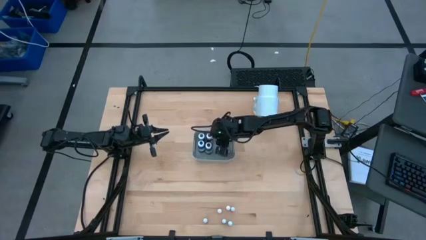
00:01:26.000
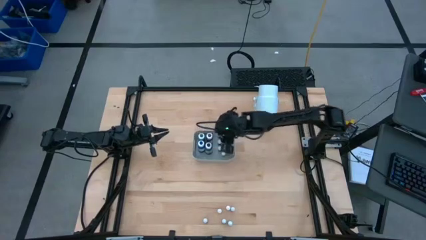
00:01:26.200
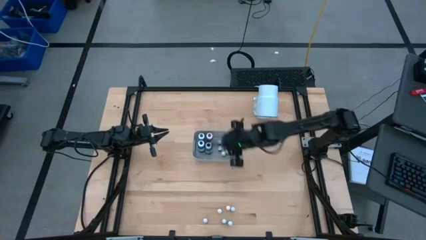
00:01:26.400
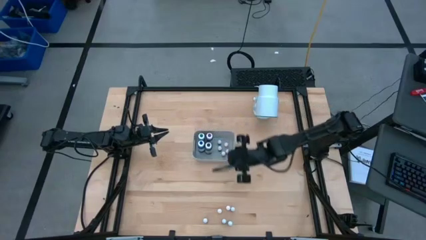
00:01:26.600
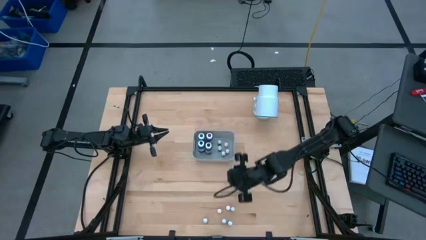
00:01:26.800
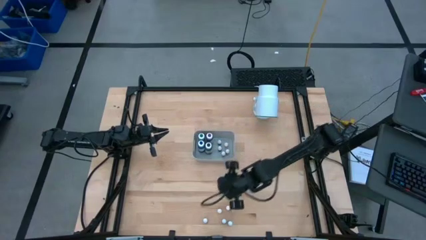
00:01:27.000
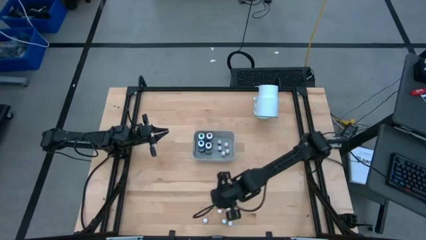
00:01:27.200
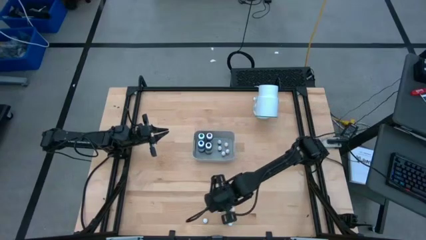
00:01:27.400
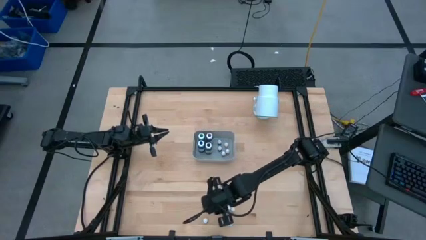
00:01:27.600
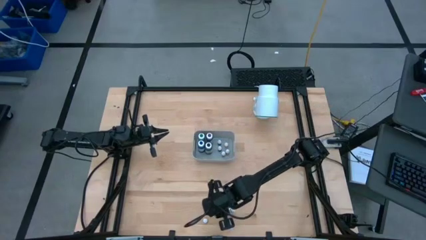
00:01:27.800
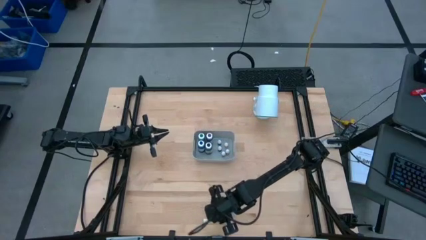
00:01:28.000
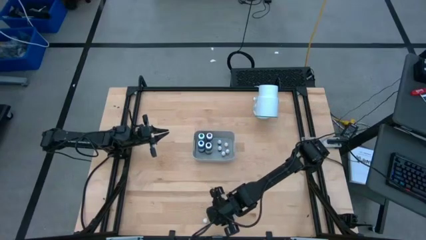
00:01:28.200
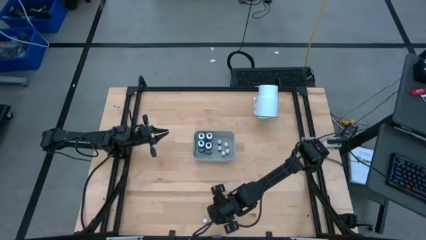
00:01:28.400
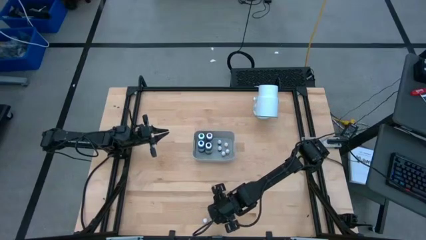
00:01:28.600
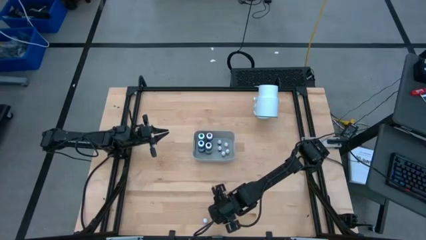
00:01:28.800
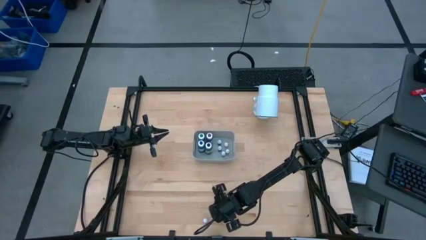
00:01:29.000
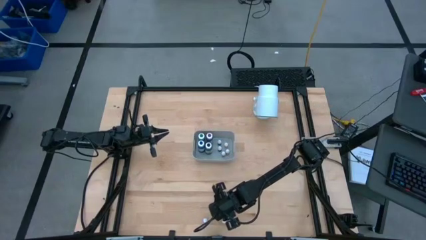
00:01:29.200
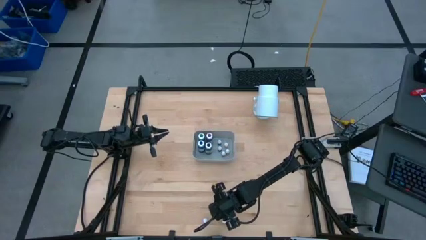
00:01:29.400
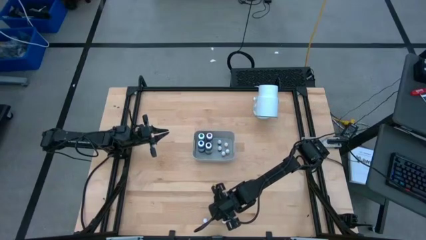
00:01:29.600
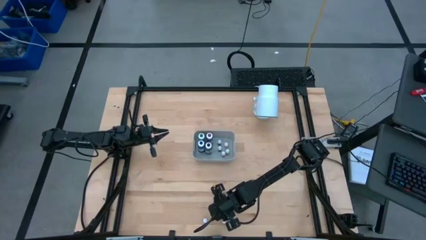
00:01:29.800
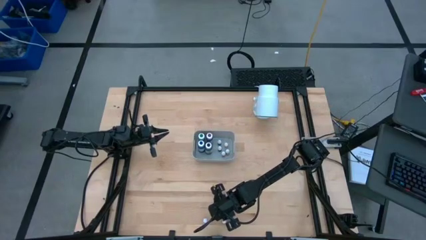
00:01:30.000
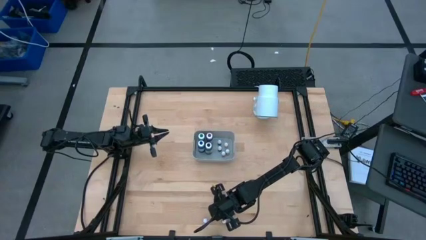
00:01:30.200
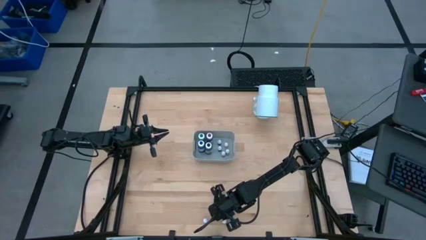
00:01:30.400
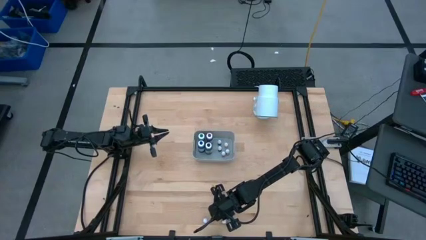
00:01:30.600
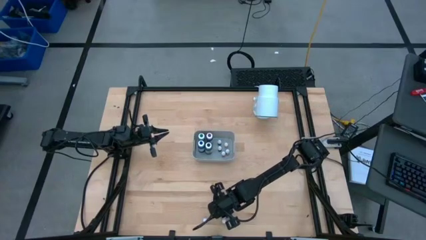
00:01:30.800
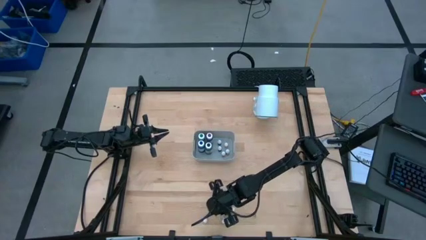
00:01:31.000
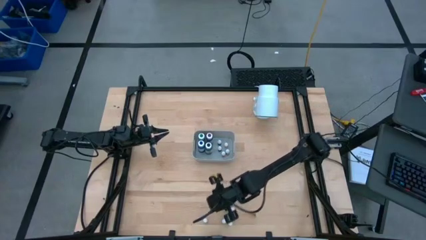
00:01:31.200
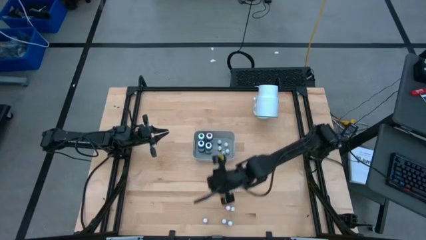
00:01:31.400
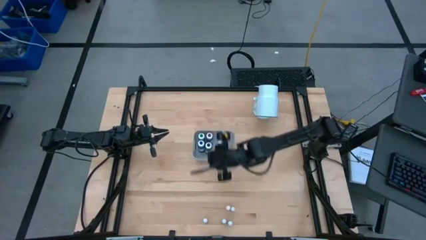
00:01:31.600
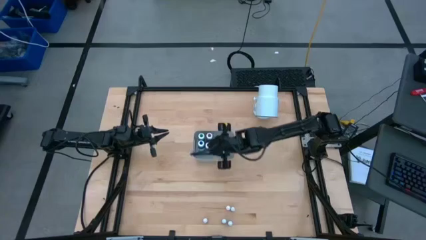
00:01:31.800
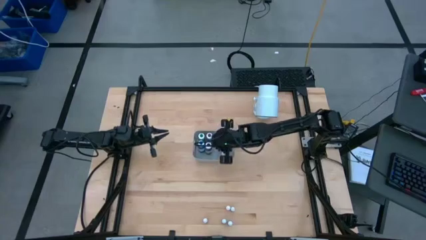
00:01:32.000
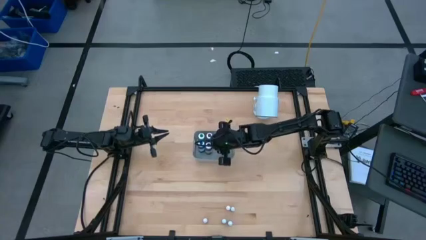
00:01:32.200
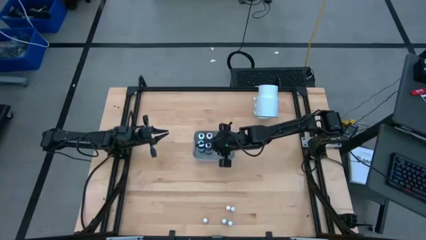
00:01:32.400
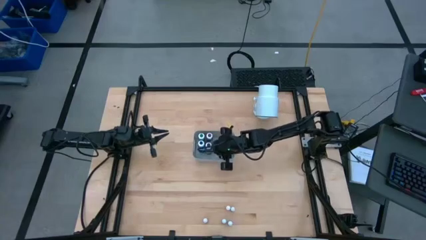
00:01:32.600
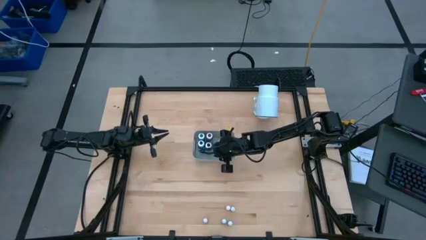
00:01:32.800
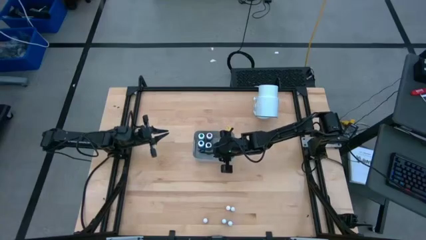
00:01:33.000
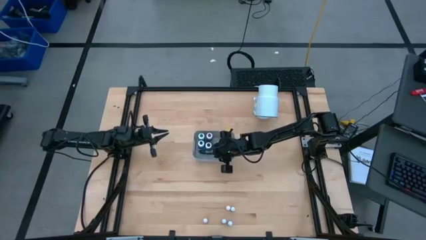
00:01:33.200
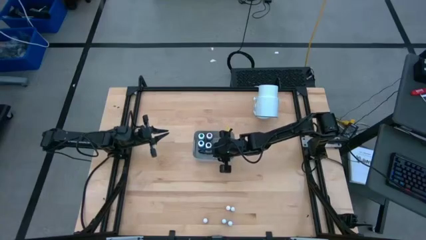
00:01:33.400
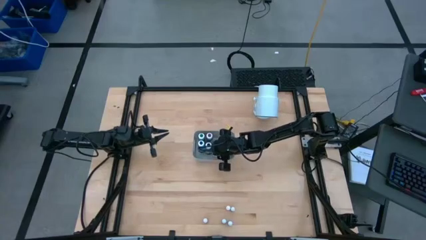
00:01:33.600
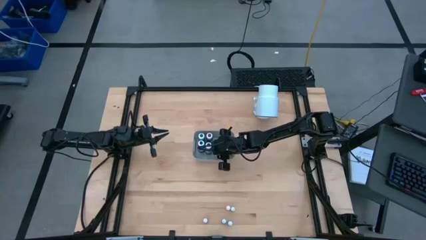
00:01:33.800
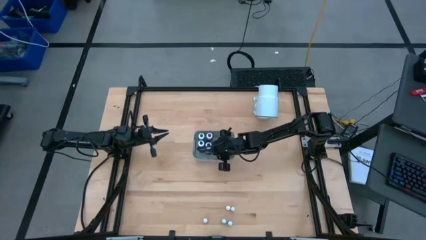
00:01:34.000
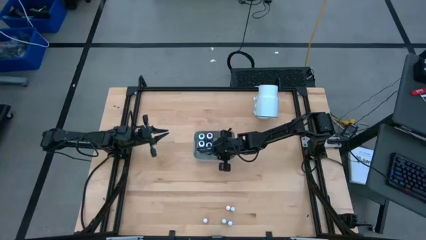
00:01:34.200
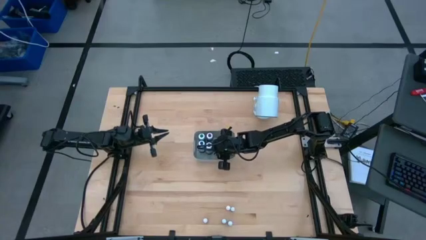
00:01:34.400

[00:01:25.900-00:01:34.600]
Task: Pick & Place food coloring
Put the small yellow food coloring bottle into the gray bin

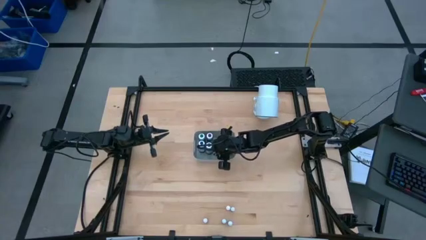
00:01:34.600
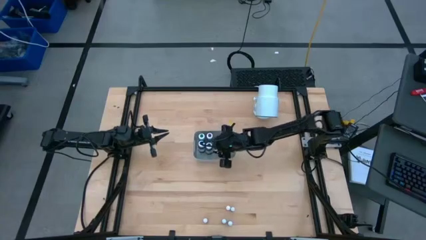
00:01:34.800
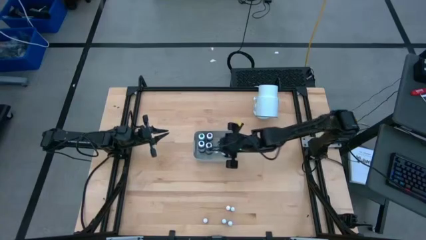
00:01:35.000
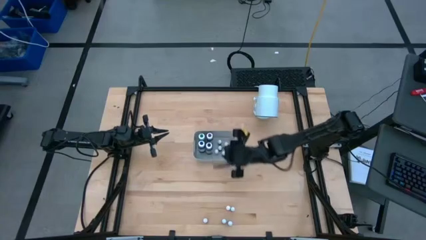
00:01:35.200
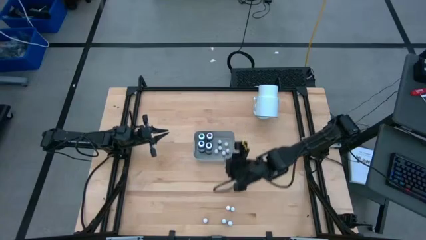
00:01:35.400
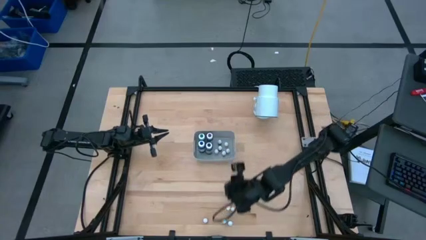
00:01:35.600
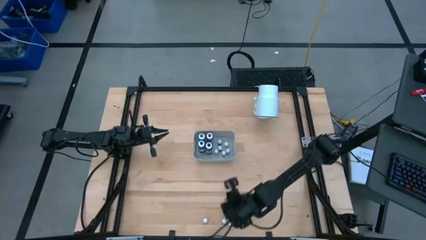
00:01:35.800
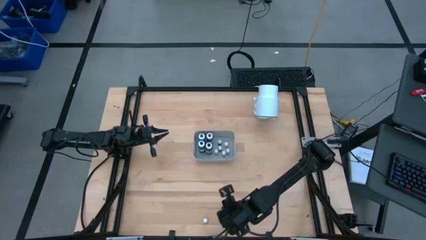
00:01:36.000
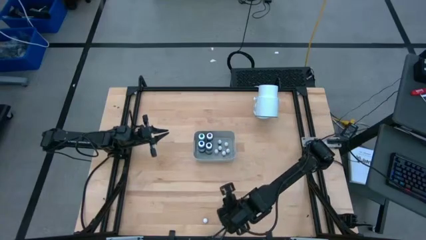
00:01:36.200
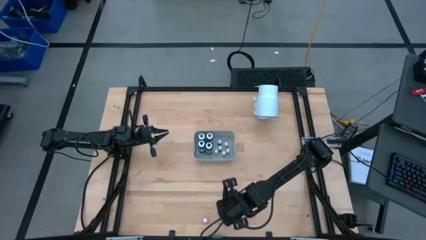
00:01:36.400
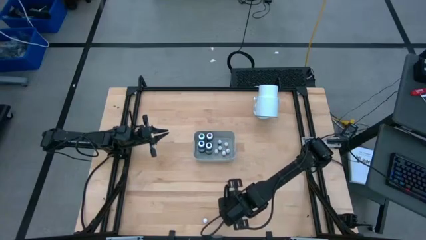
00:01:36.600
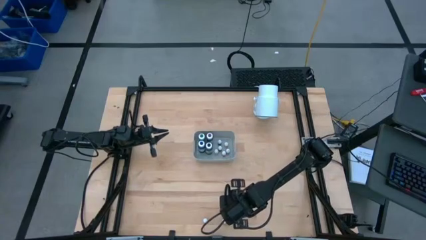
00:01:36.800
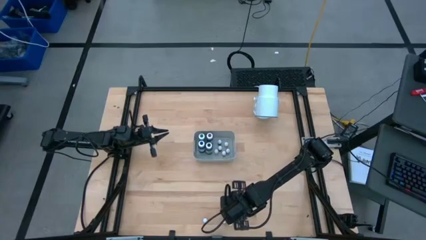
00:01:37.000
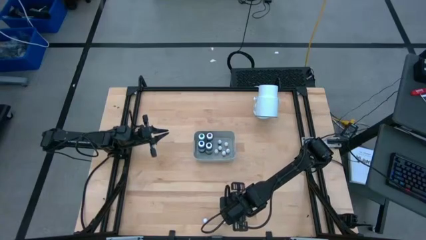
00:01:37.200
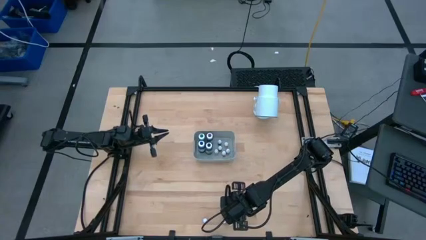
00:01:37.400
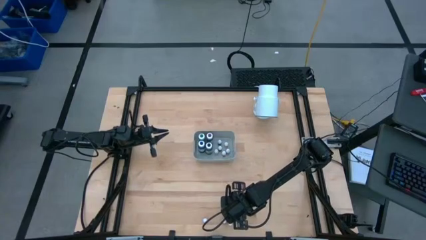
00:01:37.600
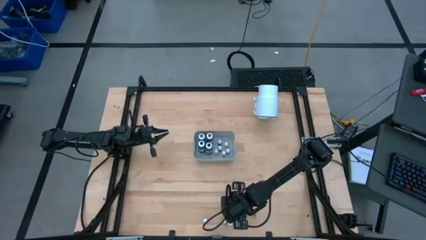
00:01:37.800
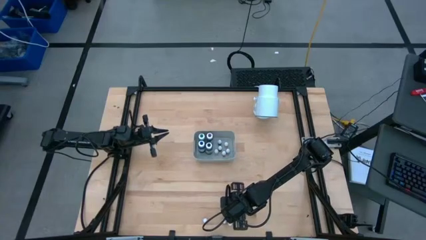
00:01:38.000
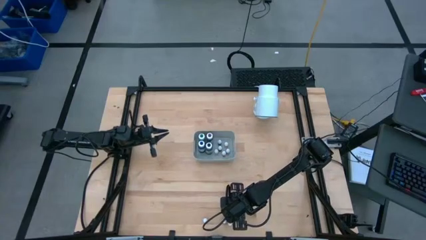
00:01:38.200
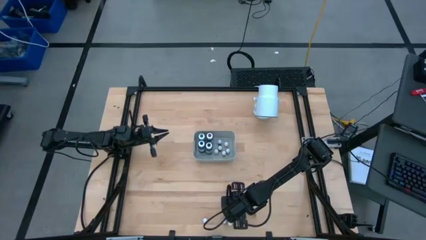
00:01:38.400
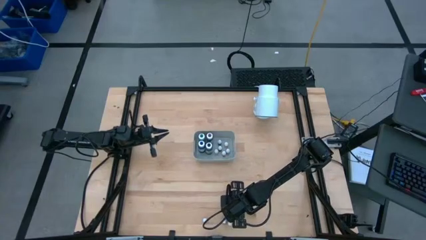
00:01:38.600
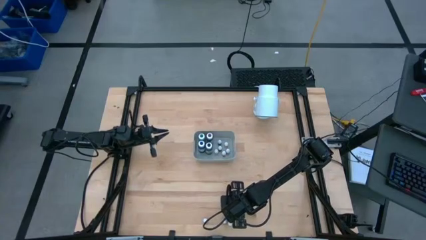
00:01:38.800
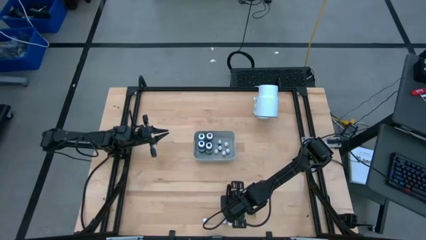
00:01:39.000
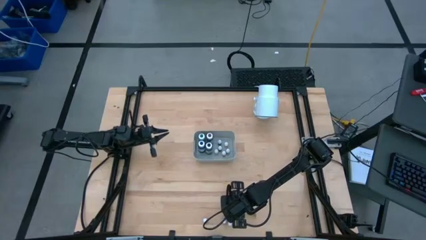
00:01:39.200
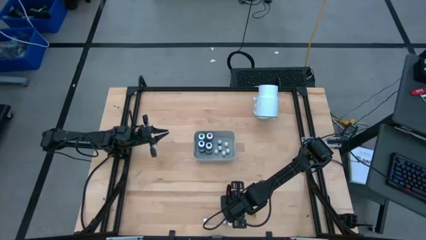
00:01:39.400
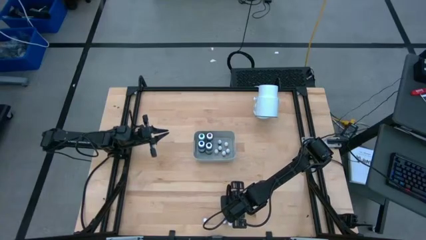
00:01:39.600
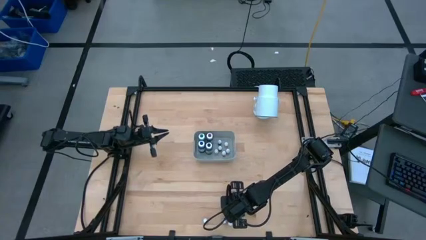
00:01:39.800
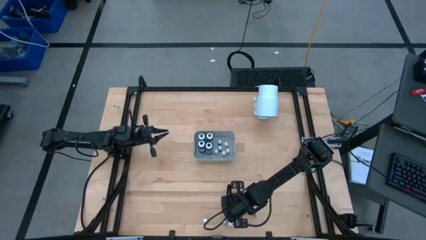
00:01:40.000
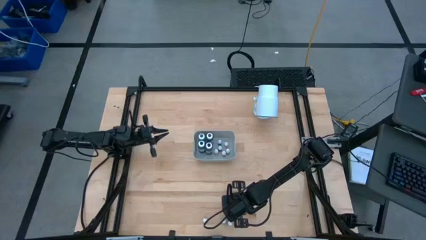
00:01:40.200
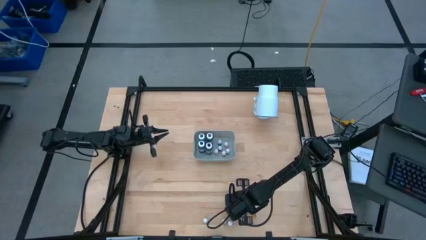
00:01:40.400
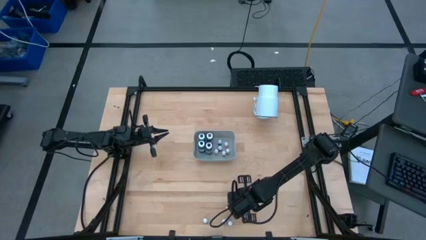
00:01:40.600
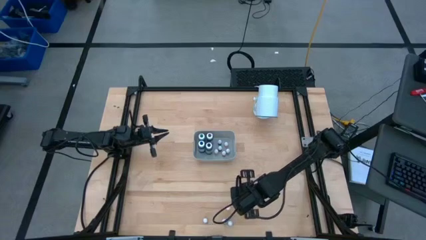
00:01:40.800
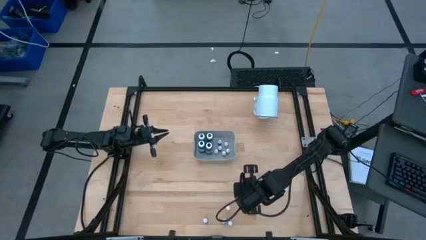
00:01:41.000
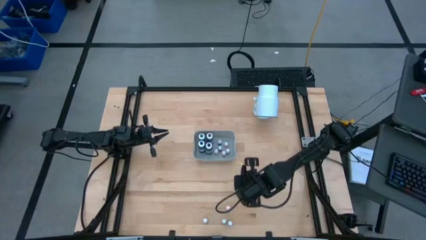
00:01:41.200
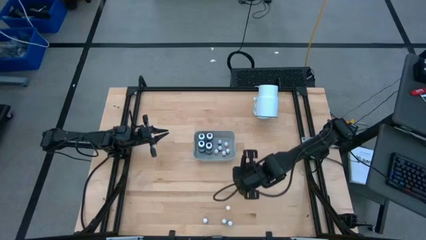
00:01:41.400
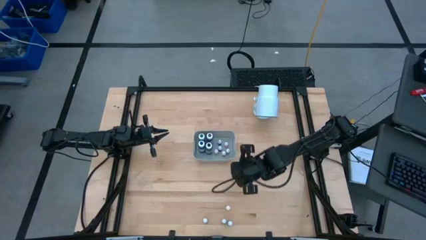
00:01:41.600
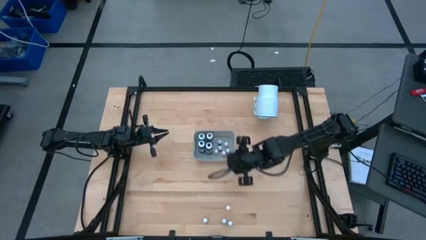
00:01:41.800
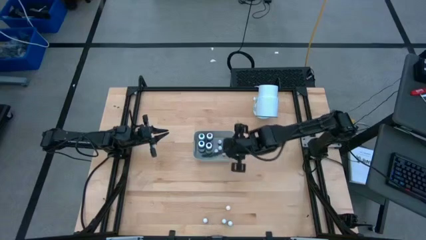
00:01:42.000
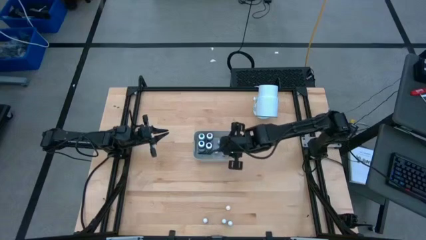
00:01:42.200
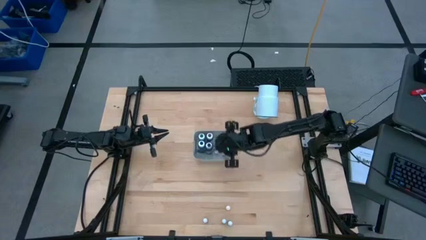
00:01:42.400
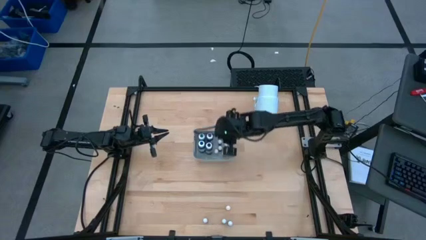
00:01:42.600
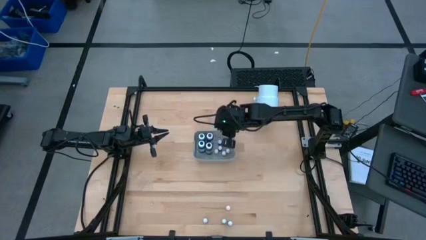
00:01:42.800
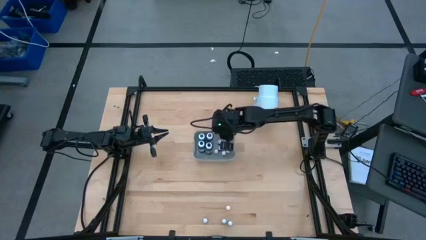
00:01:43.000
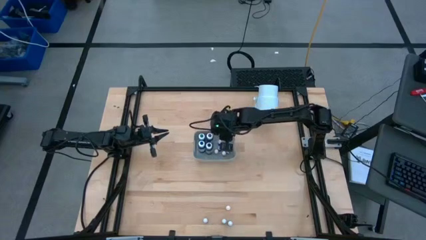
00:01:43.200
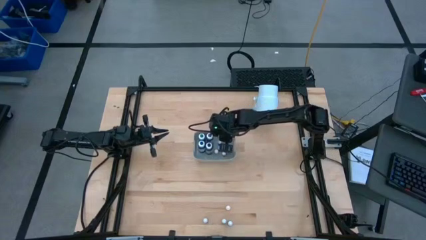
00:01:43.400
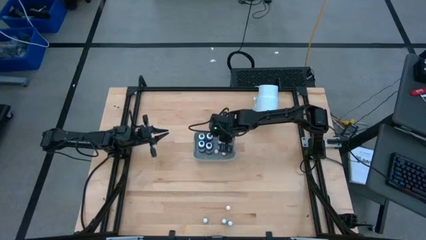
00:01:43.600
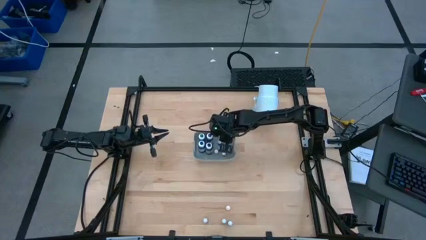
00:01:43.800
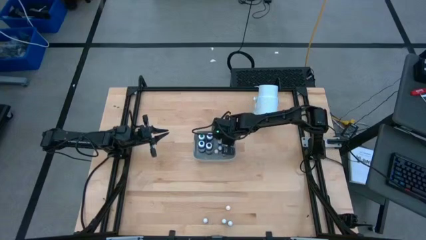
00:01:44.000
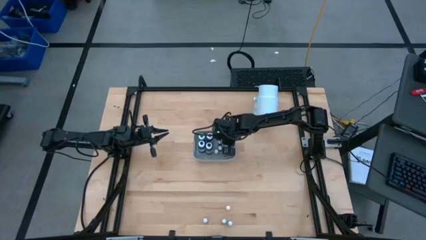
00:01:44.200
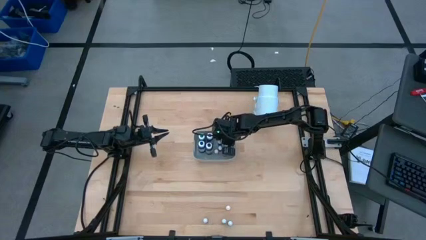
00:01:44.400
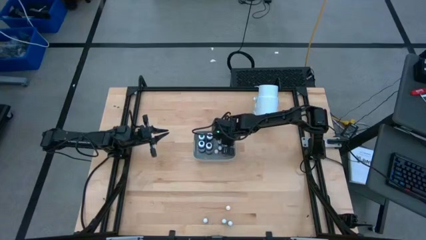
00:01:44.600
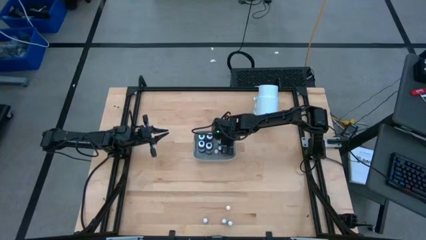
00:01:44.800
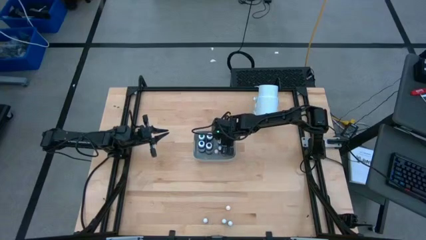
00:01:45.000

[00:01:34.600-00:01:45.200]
Put the small green food coloring bottle into the gray bin
